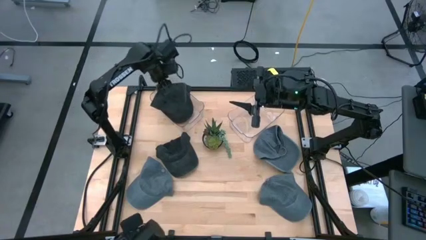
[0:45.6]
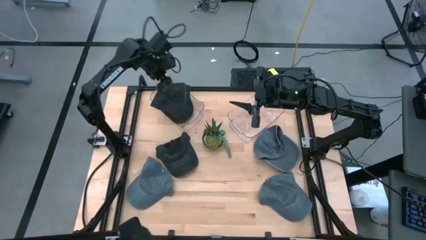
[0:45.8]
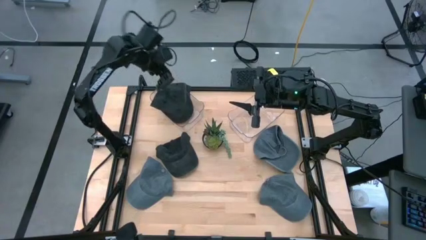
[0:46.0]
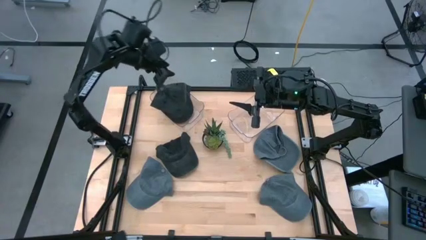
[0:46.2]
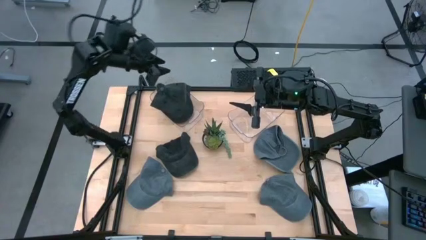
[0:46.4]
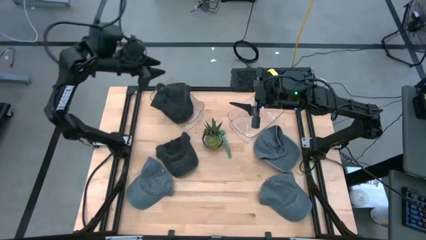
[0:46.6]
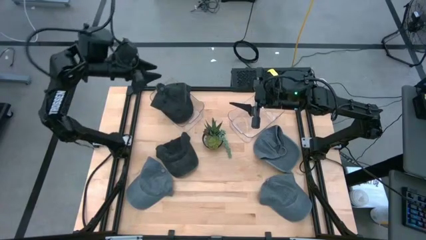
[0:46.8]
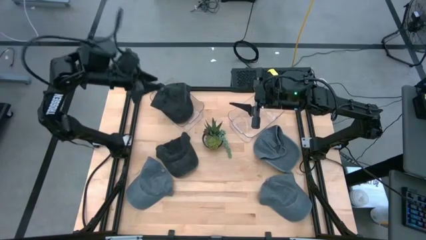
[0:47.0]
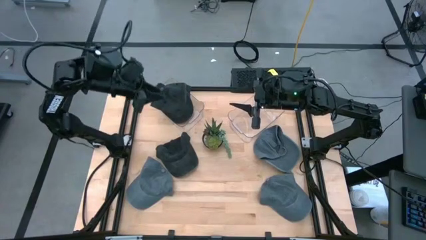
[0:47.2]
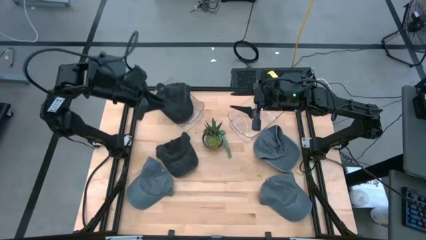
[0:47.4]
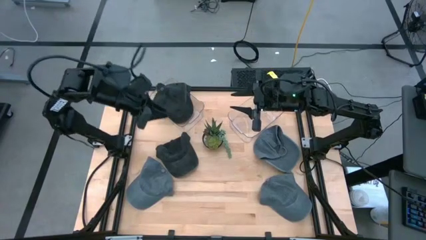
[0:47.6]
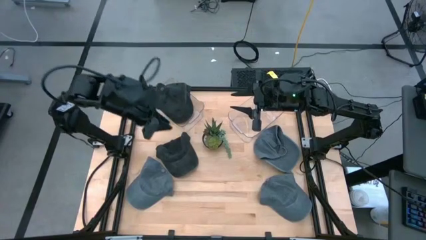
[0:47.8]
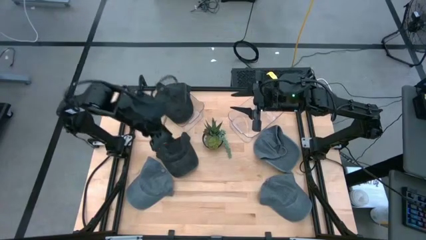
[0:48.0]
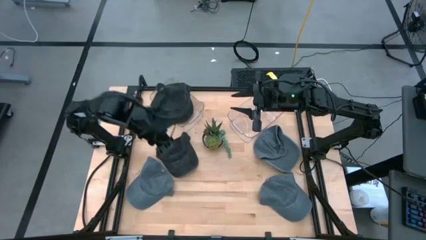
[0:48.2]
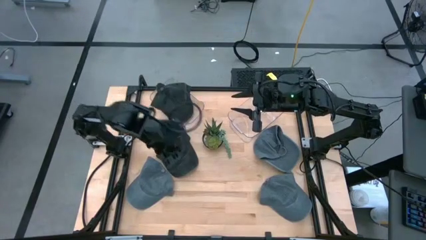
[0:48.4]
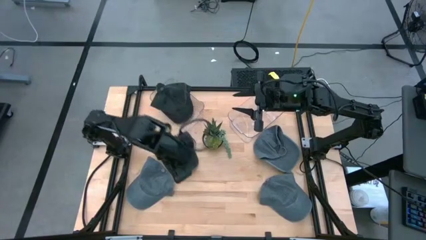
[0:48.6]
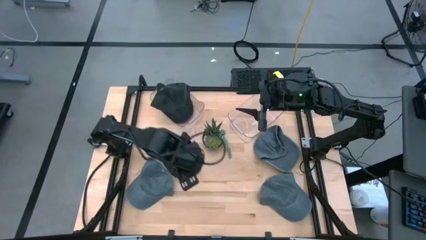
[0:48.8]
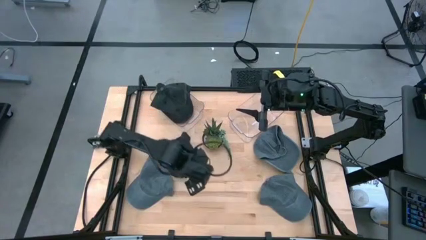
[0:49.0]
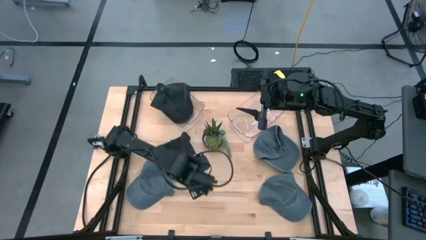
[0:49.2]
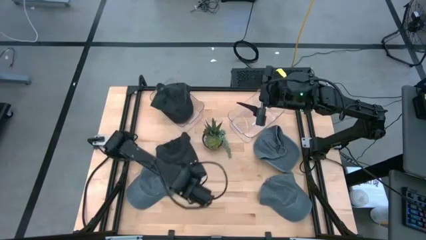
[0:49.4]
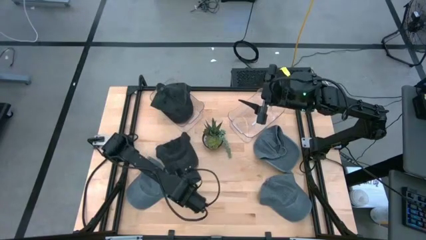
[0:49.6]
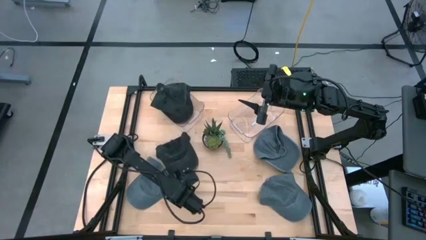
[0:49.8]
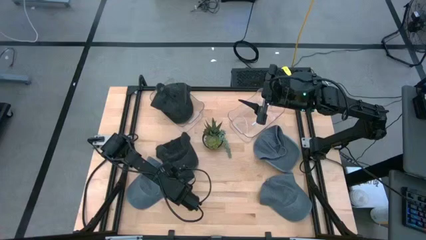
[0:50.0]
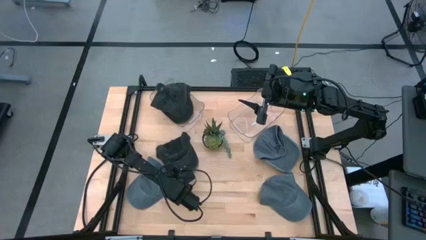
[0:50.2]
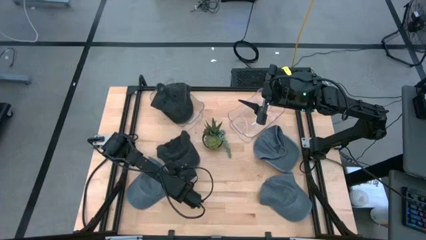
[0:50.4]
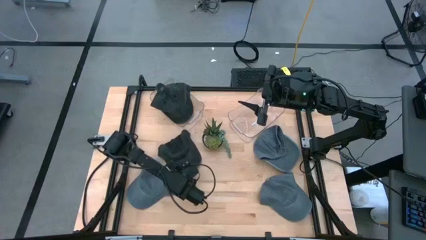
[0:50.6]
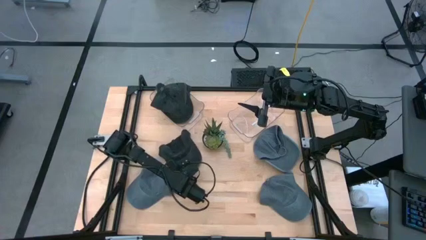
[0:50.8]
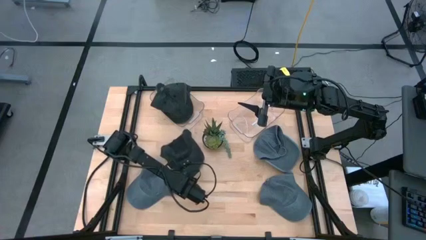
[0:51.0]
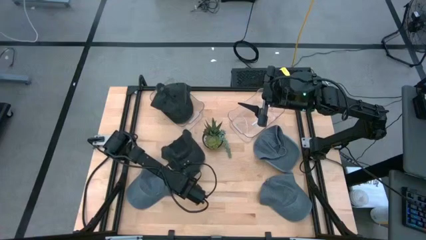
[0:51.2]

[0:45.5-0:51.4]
Task: Pick & Place hat
Put the black cap into the left transparent bin

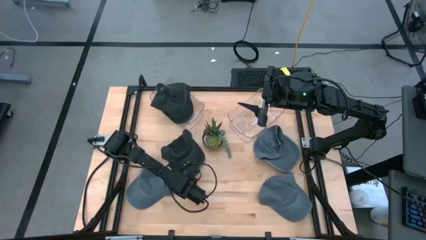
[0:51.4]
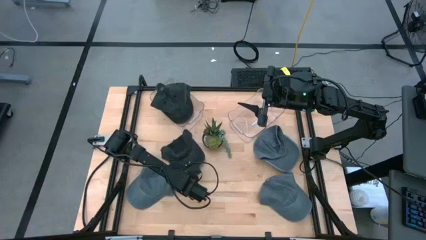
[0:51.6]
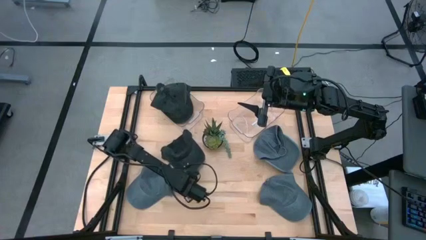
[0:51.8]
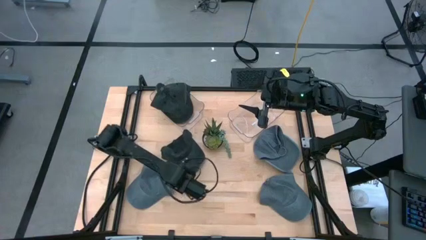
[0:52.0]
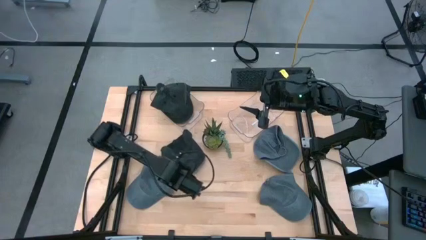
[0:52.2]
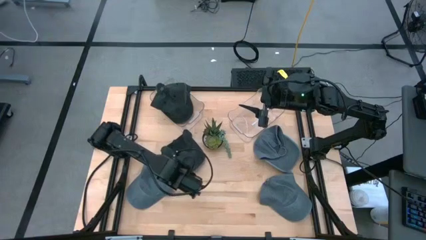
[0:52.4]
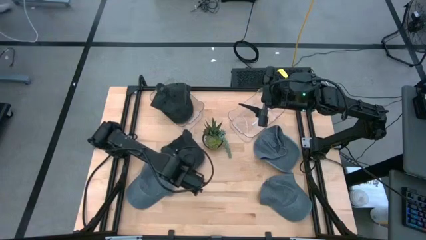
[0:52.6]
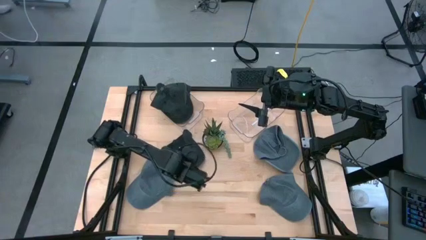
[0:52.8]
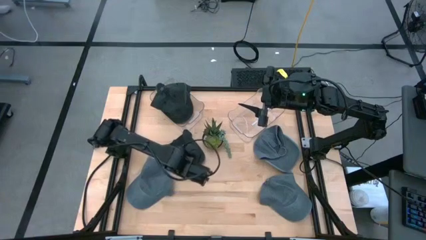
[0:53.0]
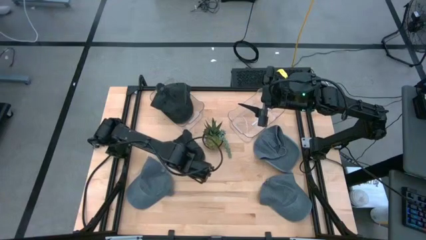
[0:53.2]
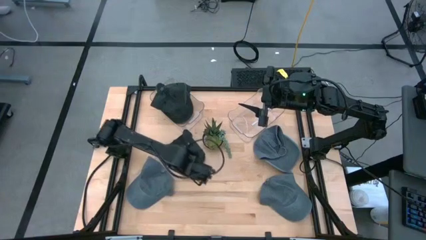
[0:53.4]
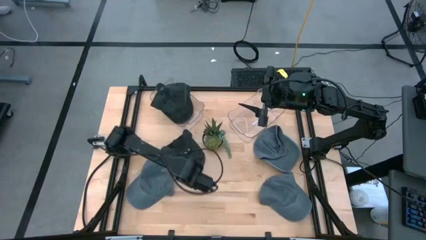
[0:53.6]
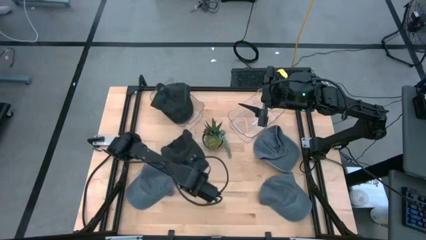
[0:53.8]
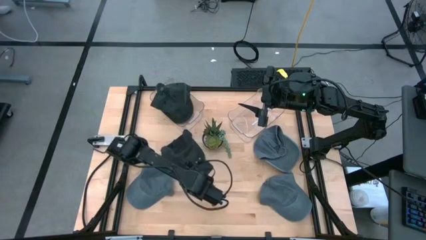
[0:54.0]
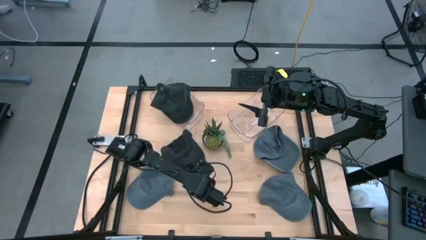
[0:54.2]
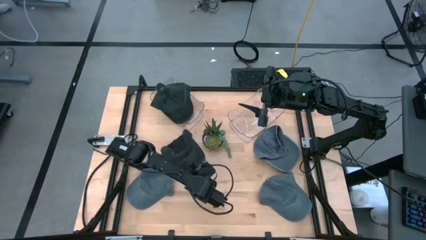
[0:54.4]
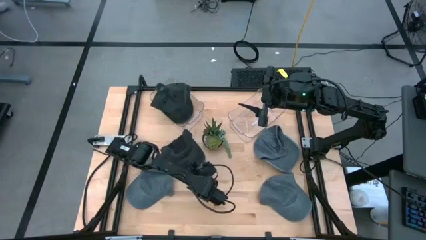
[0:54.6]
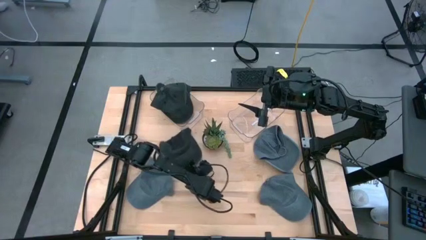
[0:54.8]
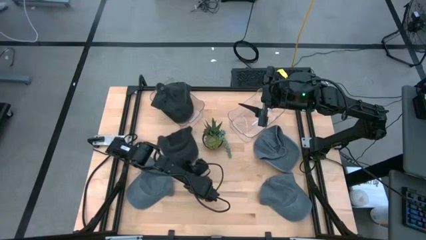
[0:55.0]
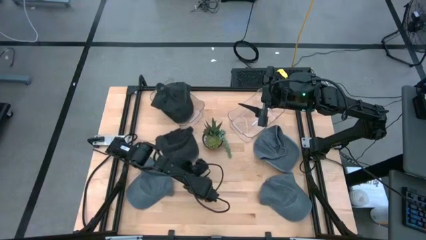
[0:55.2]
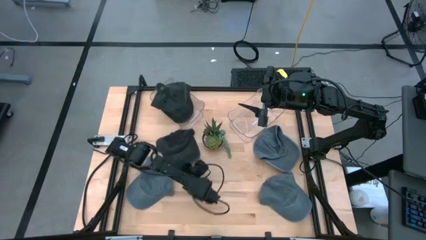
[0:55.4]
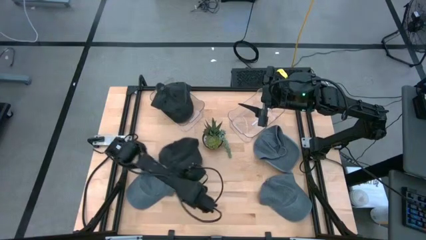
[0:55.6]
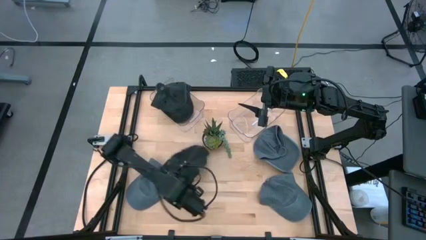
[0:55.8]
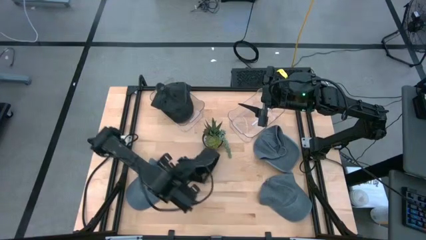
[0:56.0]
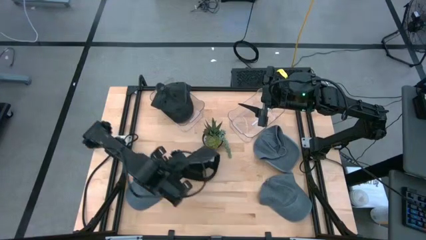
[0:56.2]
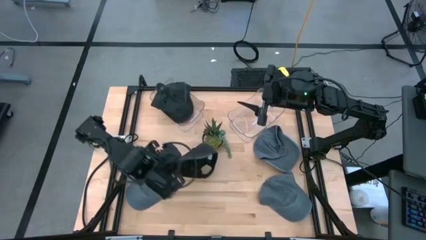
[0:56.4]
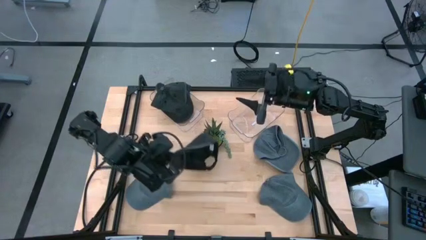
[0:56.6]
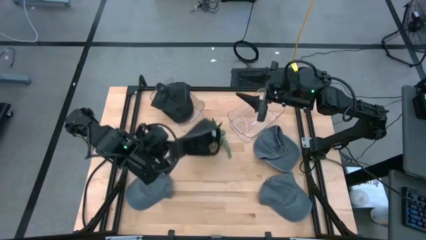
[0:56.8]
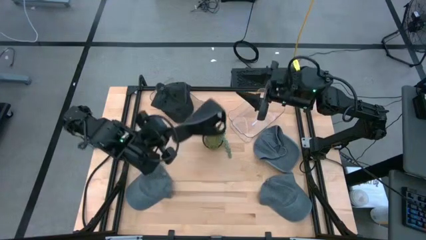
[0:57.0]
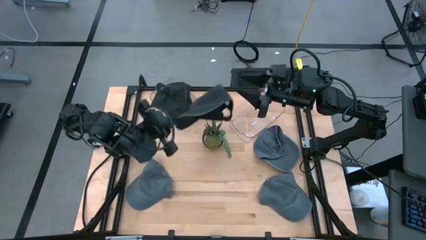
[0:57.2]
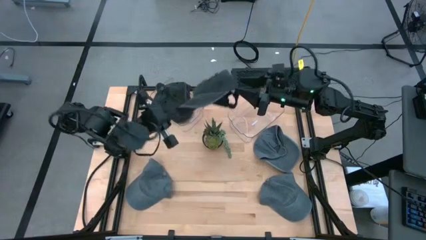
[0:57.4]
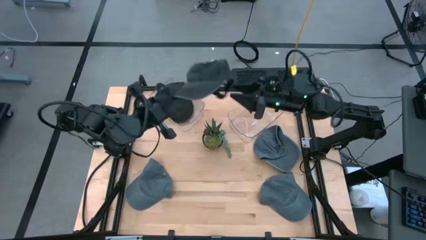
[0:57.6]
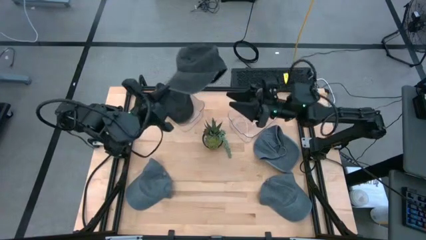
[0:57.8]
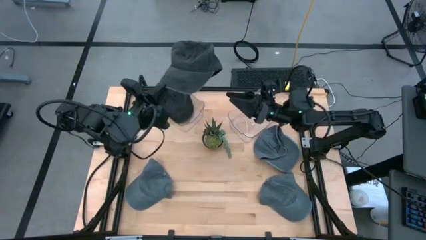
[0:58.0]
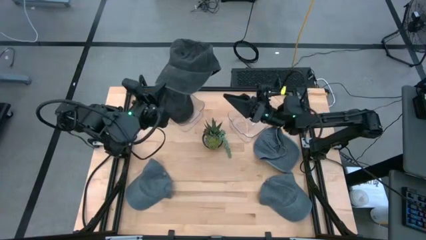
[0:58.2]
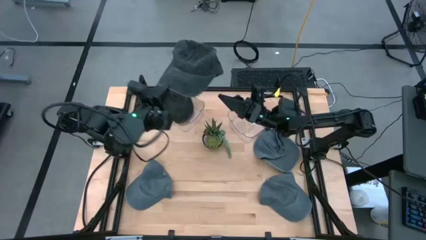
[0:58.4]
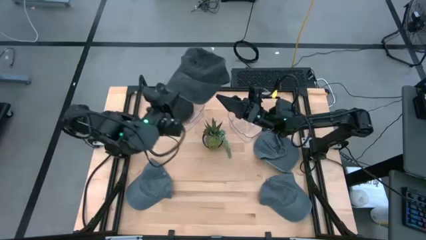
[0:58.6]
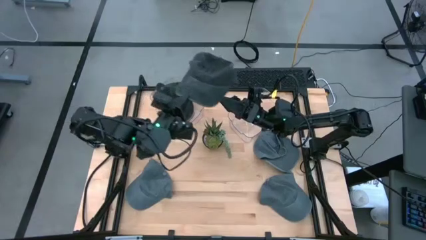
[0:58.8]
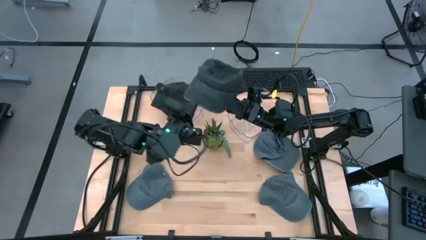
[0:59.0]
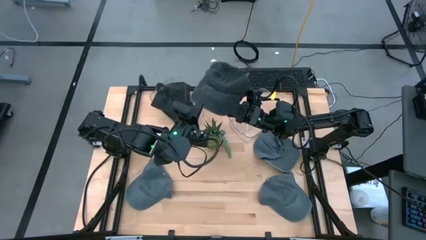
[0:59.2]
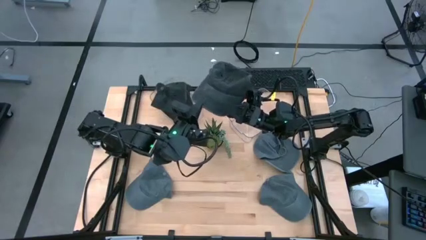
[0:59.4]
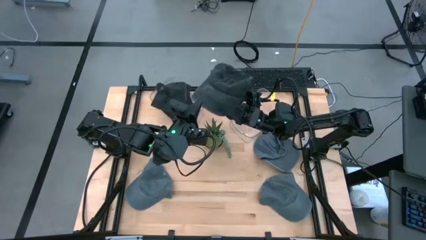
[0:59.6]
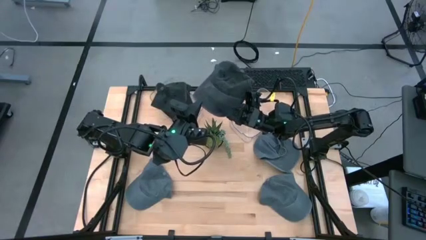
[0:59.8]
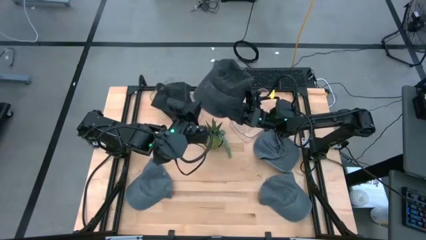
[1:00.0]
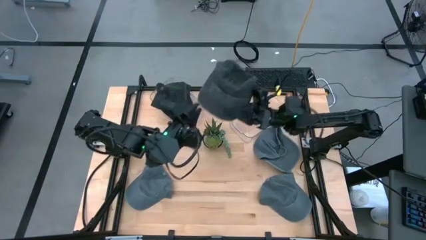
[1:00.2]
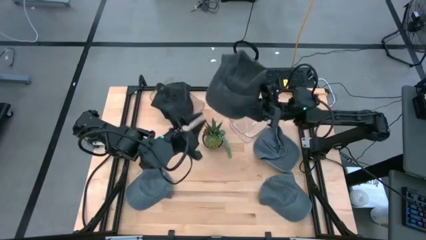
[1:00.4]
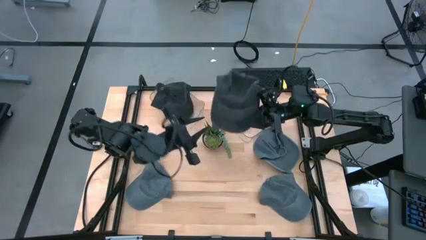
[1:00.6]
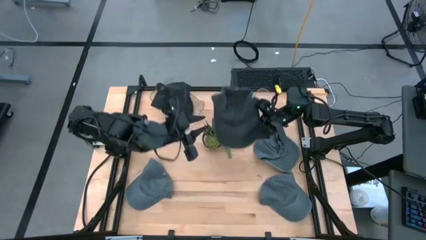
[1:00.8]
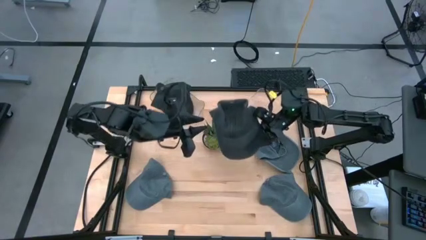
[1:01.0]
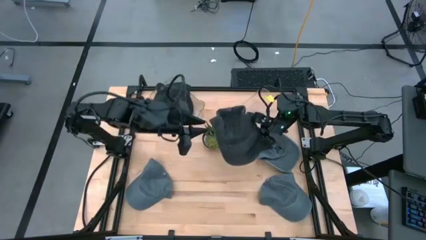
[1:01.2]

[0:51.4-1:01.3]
Put the black cap into the left transparent bin

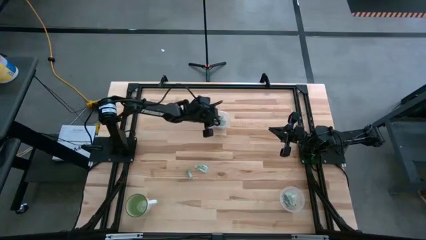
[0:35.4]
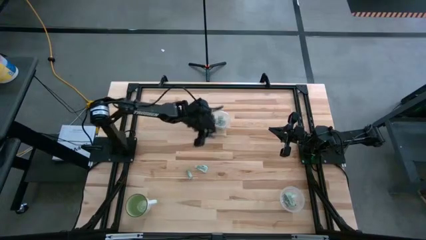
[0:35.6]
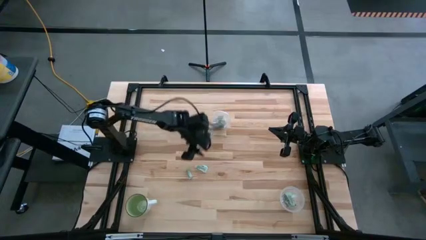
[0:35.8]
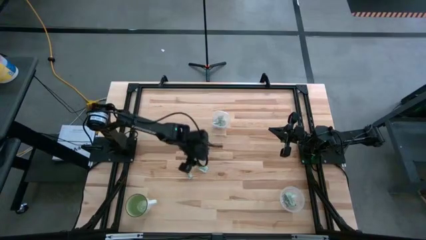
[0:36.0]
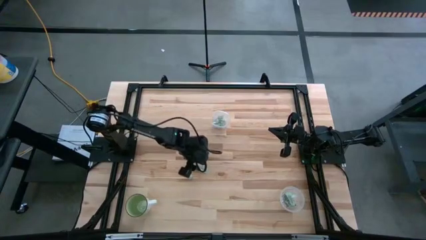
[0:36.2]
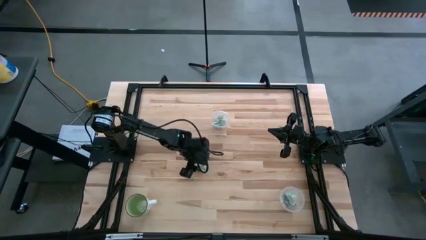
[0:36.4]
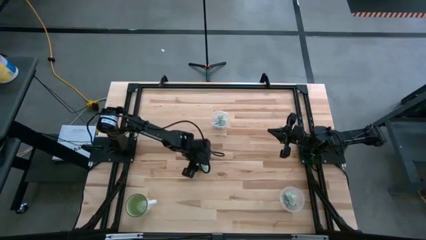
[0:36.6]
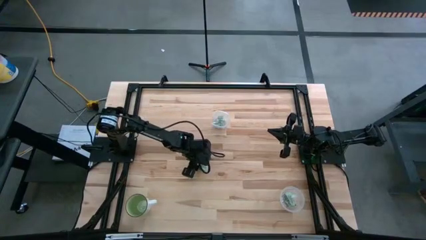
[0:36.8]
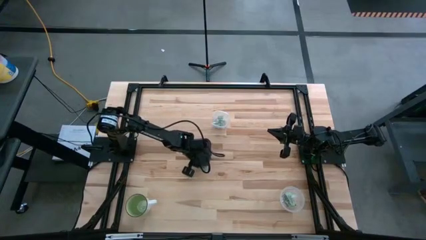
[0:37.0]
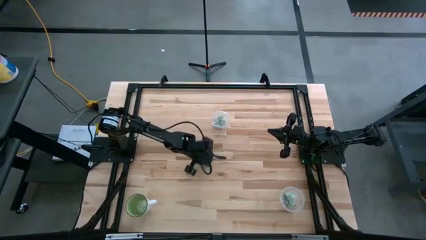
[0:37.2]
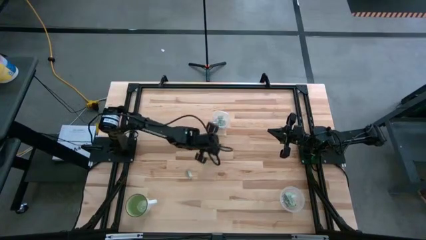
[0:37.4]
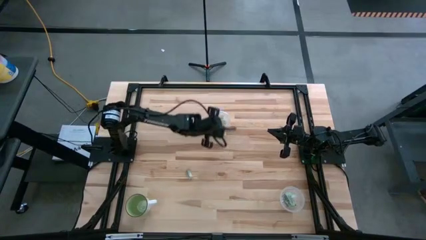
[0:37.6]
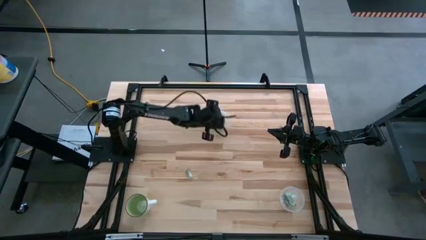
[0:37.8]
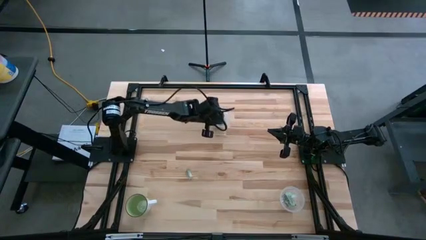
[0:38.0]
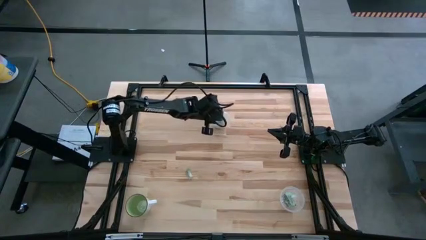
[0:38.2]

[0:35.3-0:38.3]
Task: Pick and place items into bin
Put the green stevia packet into the square transparent bin
